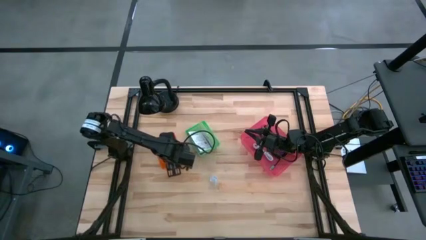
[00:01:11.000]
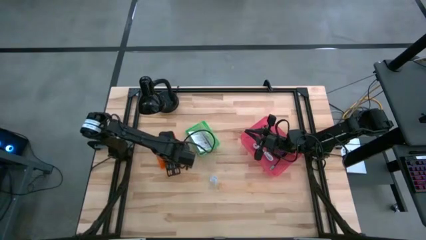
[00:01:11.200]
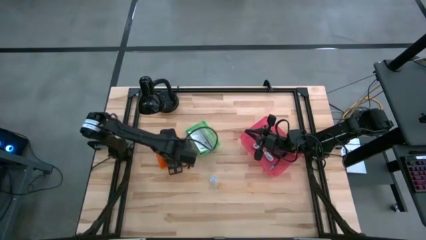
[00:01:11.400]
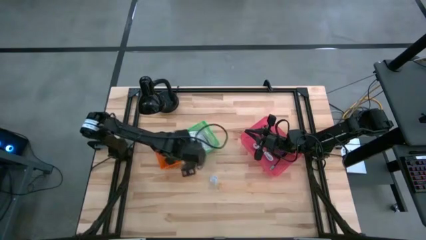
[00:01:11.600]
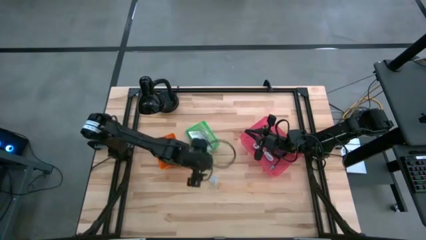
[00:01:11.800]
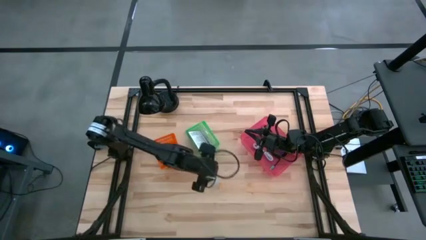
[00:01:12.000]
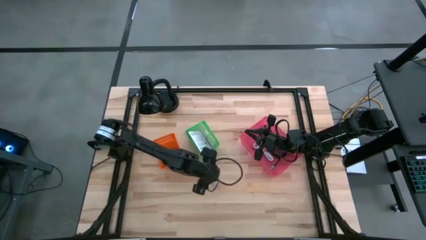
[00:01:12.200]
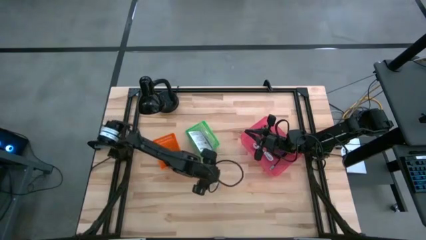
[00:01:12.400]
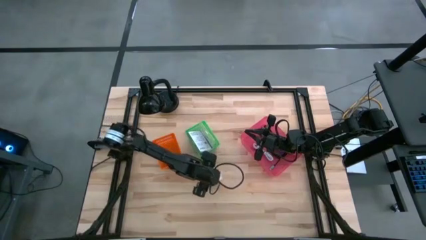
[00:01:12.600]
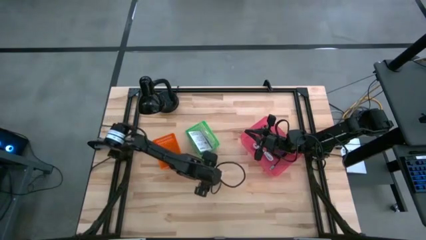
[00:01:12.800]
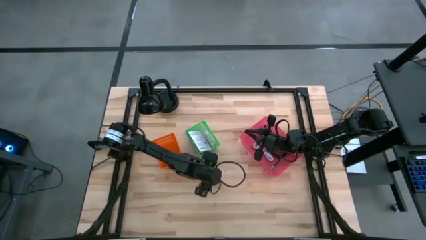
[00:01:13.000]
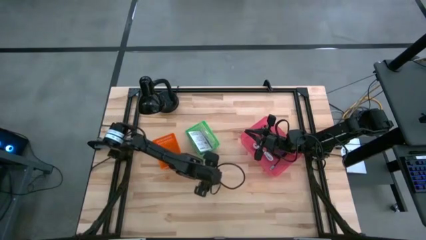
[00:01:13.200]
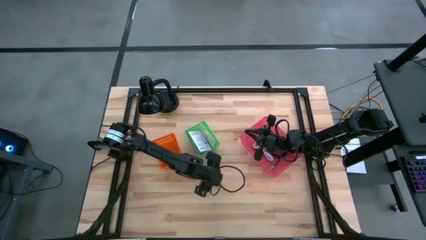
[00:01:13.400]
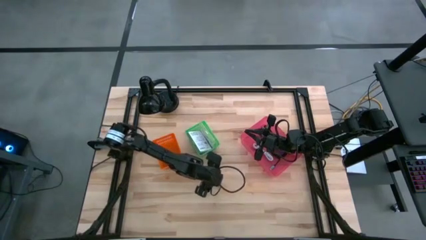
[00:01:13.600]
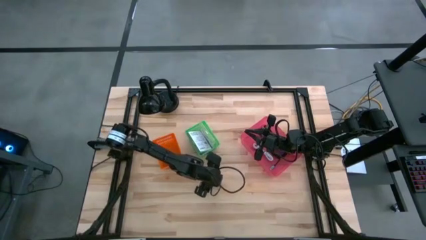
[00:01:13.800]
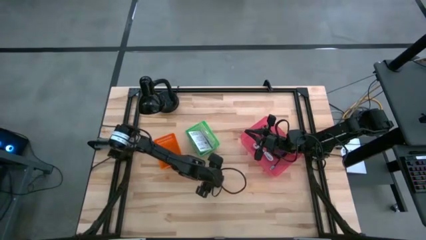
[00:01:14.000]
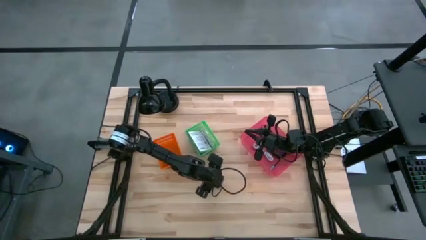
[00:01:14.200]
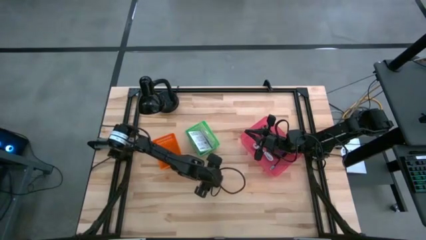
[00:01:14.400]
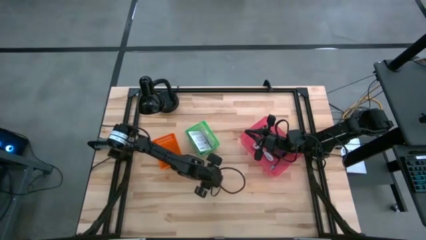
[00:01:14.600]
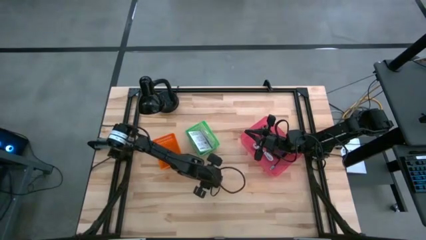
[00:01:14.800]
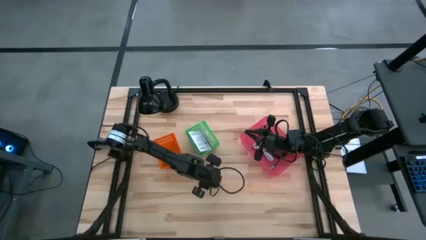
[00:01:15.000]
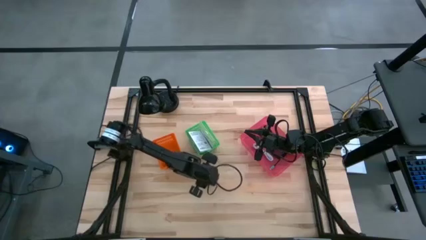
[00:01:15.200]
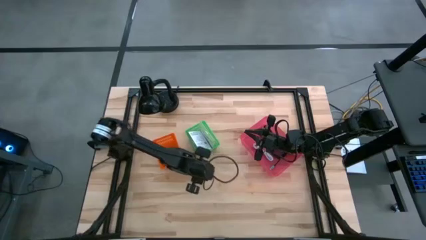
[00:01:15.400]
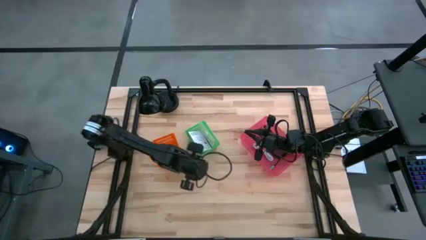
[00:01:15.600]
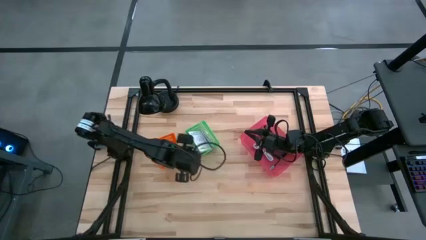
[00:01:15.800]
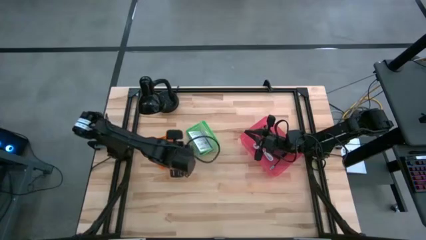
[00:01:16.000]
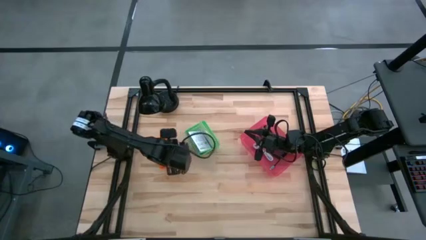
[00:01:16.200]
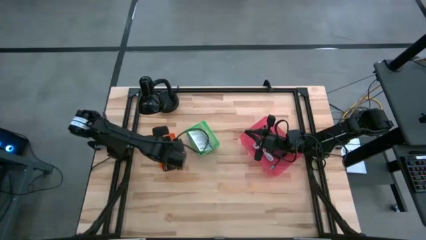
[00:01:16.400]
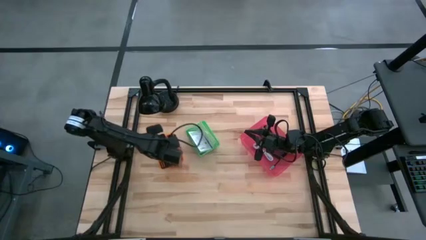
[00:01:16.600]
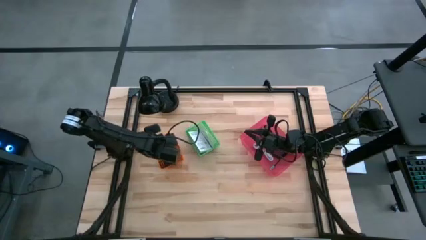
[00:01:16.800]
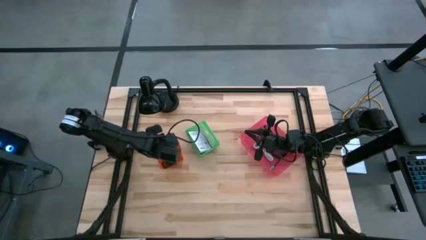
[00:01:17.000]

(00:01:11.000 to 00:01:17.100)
Task: Pick and place items into bin
Put the white charger adapter into the orange bin

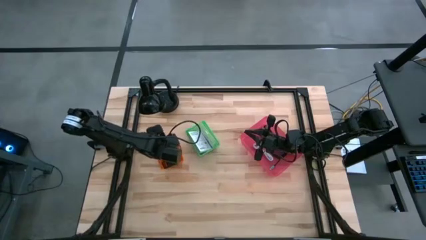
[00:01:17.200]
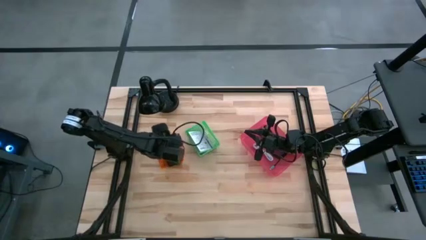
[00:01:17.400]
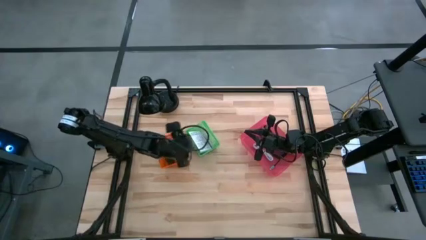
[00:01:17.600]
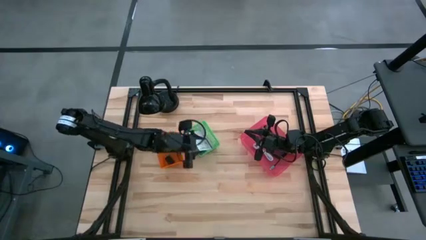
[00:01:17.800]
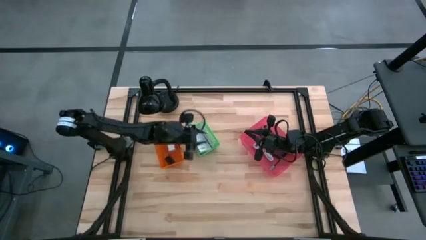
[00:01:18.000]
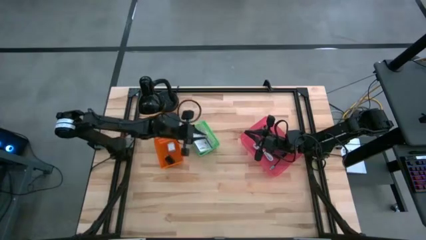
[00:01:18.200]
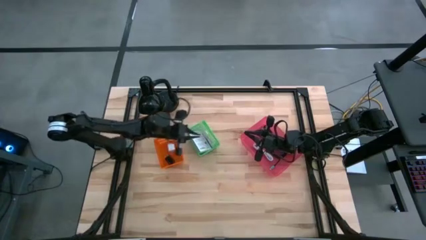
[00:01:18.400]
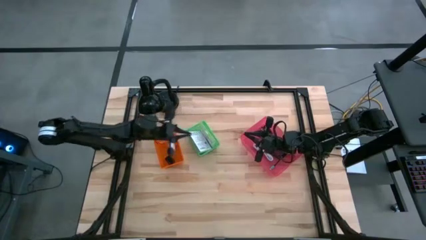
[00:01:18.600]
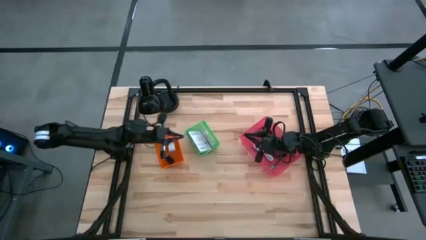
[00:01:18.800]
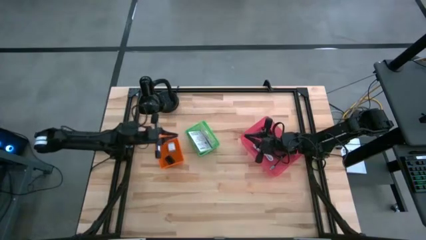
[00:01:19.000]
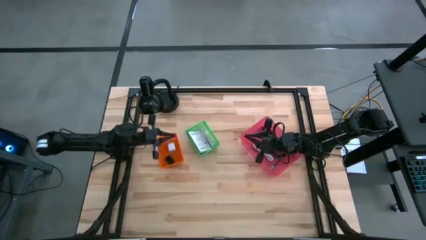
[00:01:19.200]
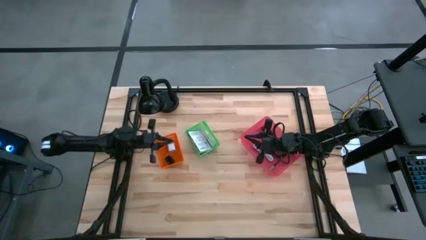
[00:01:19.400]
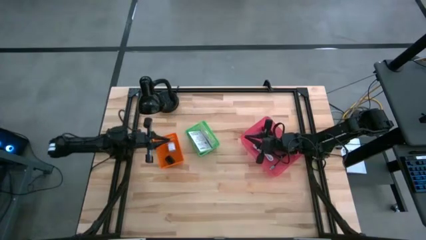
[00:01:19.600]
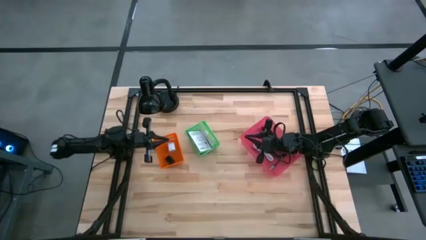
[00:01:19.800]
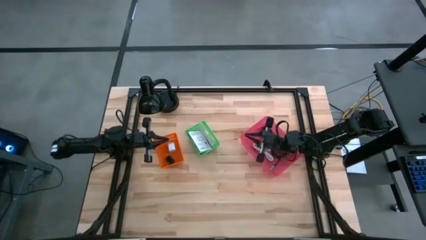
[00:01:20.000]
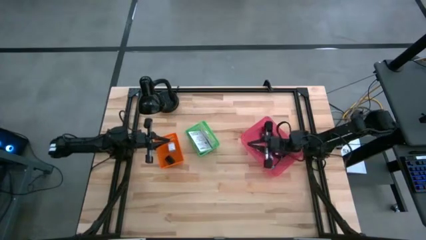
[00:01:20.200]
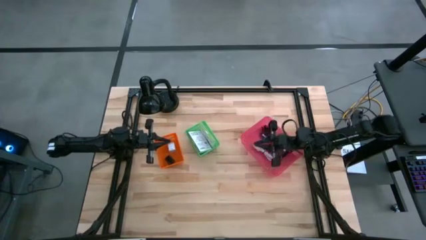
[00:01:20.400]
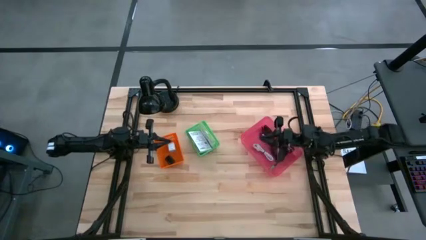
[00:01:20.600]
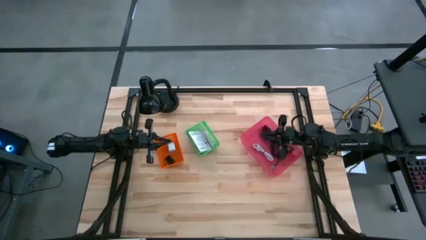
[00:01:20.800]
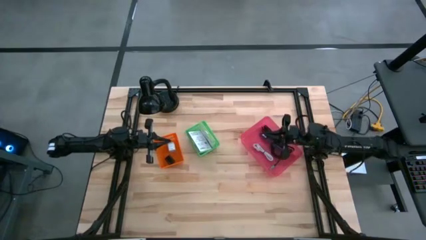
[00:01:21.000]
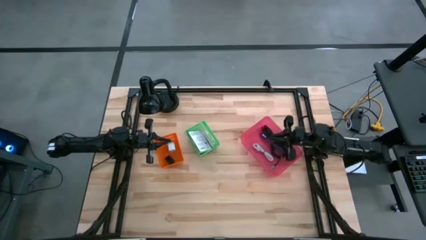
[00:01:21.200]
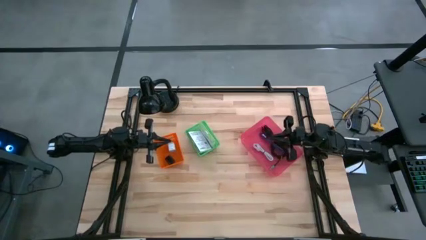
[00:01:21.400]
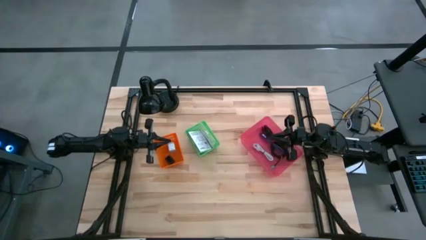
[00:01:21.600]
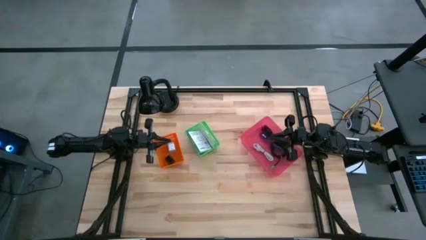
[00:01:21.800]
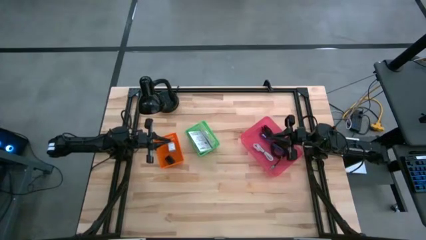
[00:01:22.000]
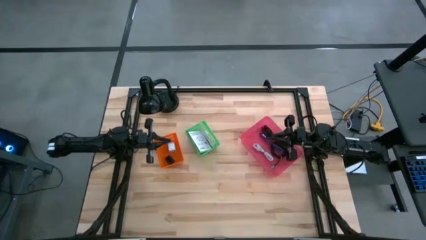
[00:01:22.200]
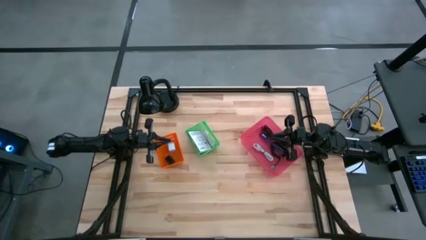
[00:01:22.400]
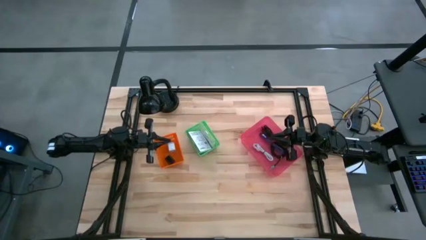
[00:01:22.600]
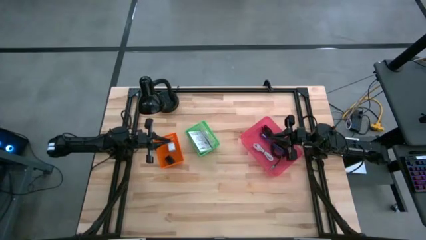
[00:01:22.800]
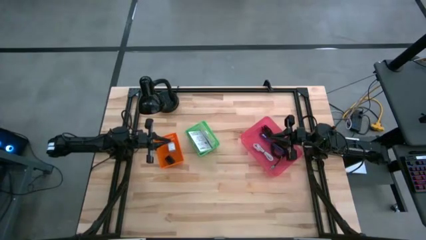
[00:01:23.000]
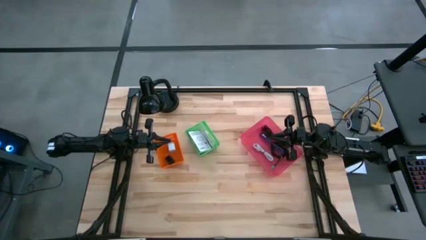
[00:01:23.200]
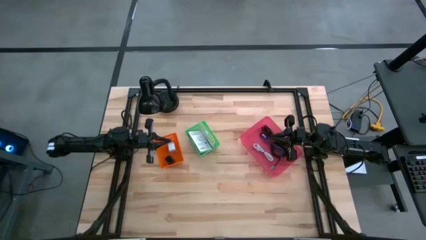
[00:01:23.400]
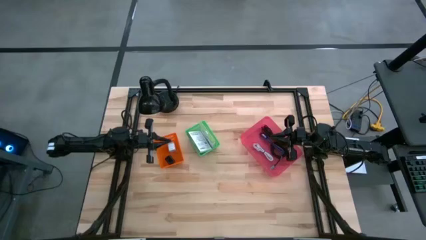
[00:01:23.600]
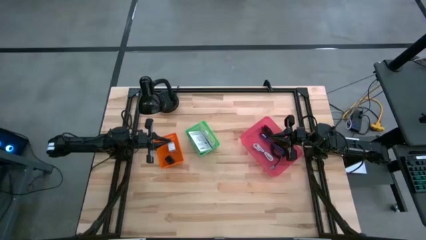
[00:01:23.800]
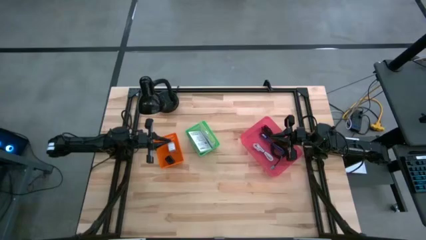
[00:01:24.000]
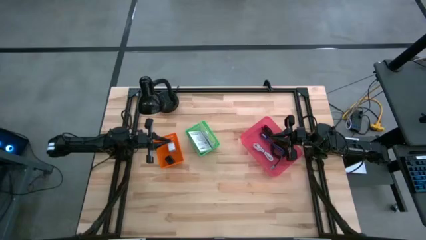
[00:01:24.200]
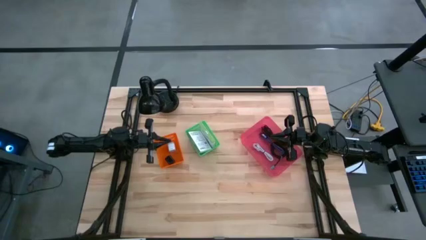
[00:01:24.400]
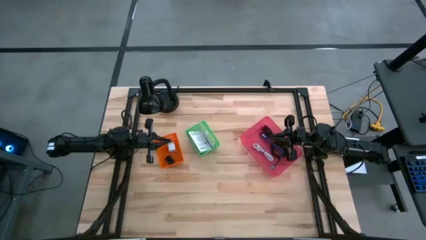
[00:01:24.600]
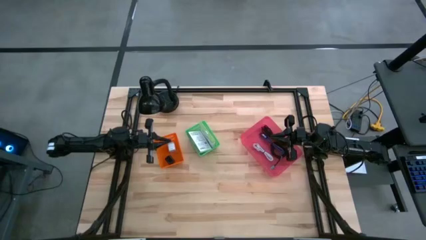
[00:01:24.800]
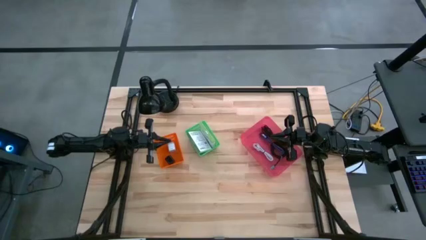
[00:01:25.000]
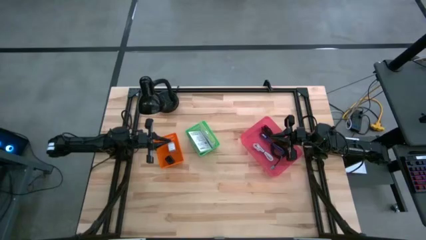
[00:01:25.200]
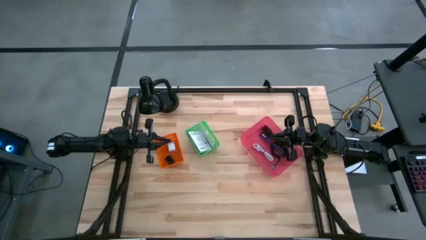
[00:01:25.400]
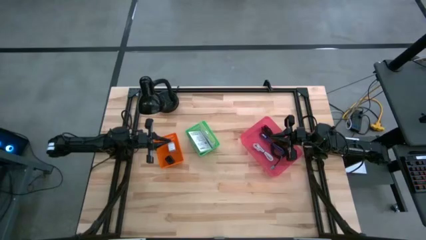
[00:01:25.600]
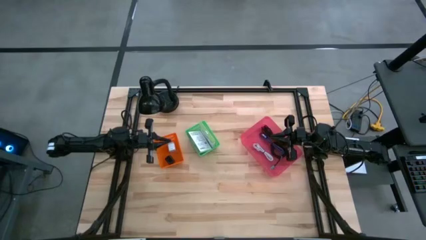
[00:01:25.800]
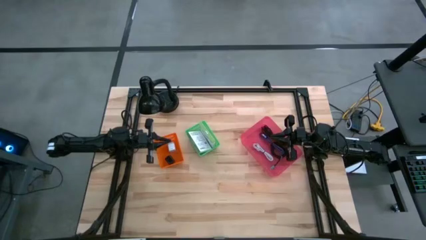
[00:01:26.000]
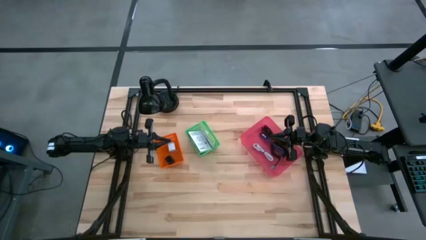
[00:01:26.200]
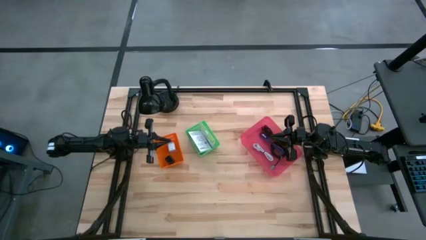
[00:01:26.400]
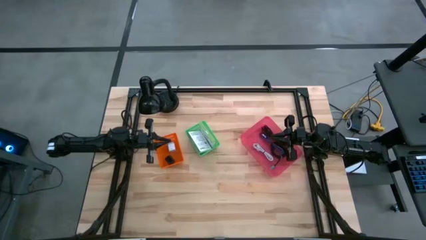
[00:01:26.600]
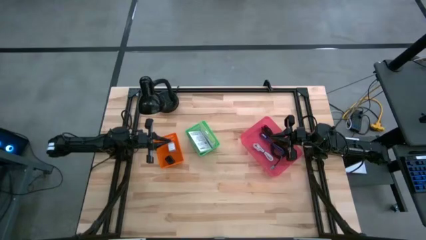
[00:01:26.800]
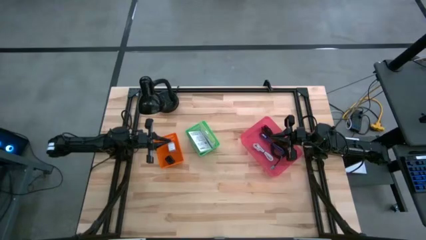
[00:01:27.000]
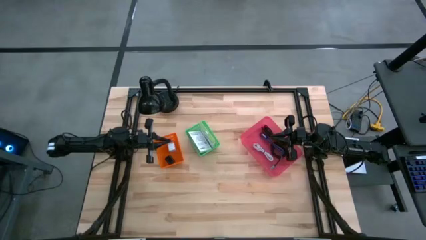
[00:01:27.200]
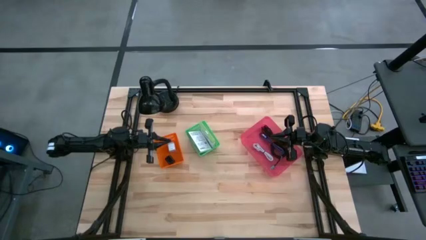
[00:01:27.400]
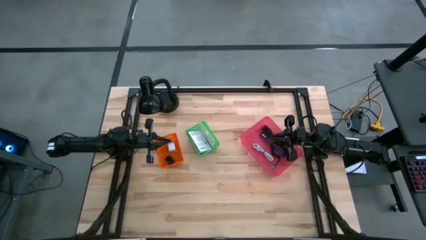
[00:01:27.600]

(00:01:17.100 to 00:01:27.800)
Return to Home Position
